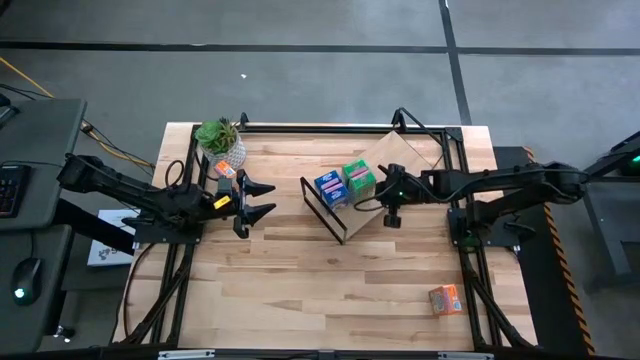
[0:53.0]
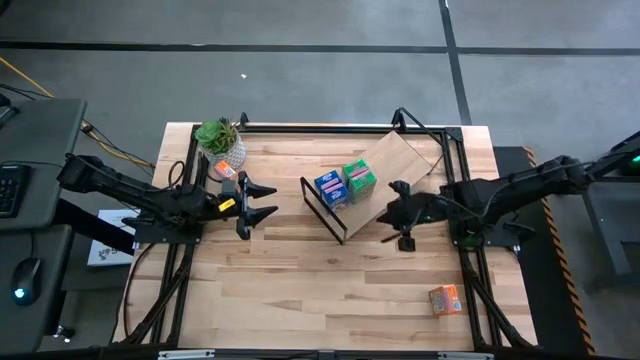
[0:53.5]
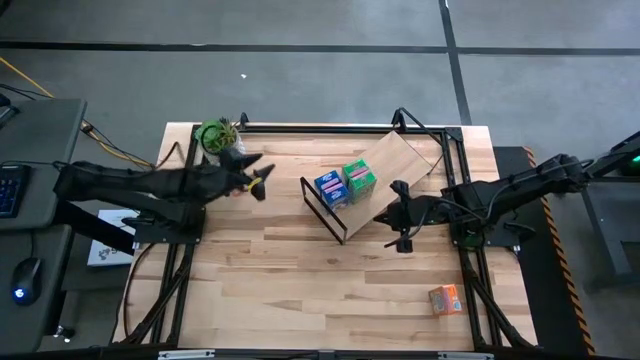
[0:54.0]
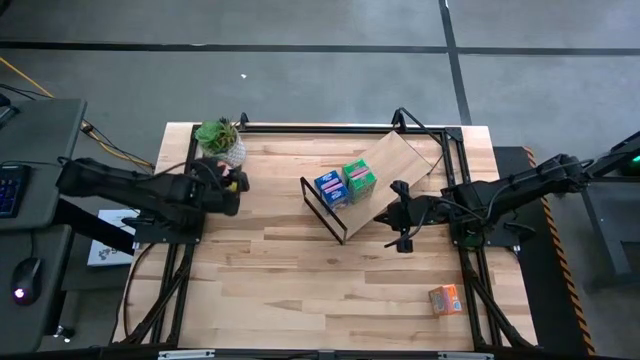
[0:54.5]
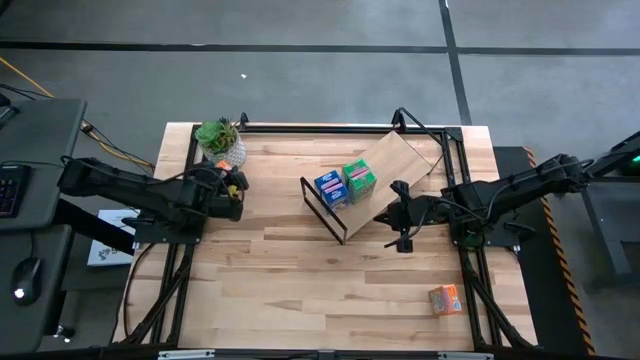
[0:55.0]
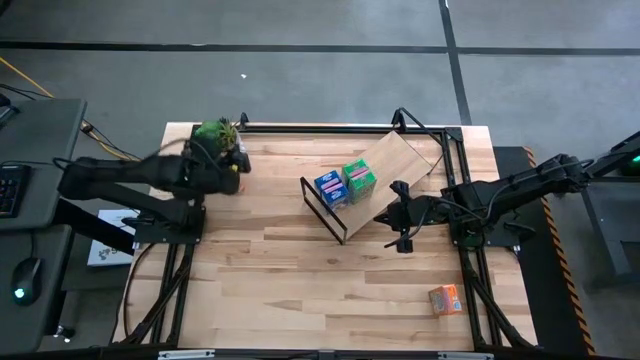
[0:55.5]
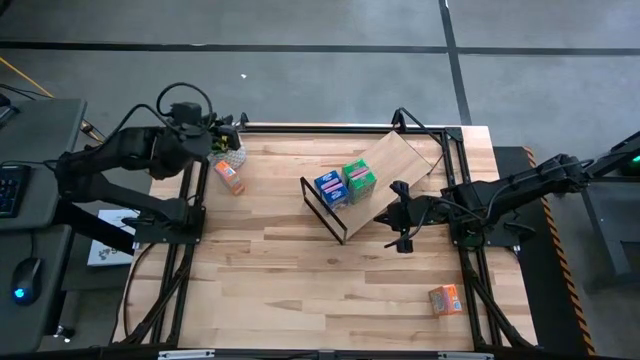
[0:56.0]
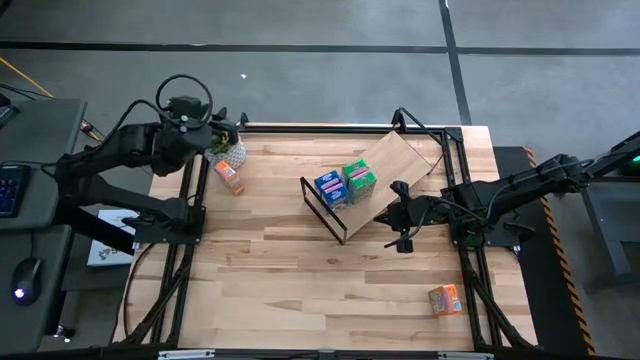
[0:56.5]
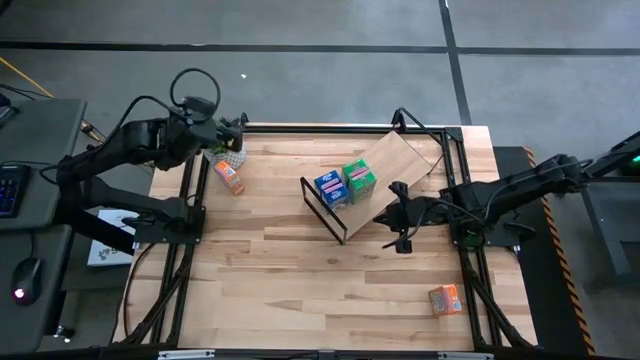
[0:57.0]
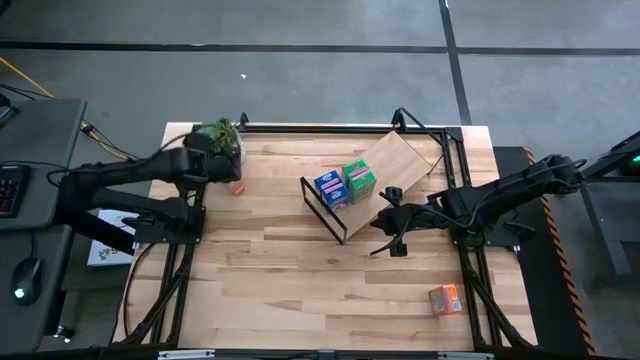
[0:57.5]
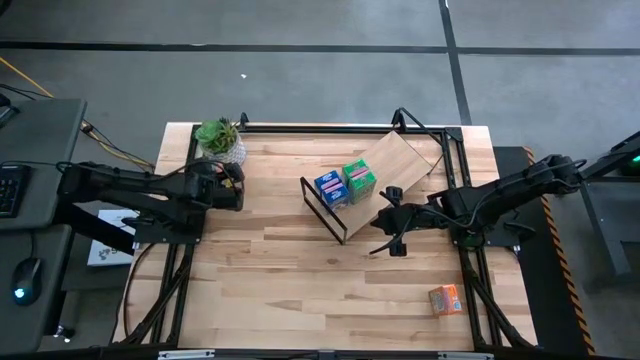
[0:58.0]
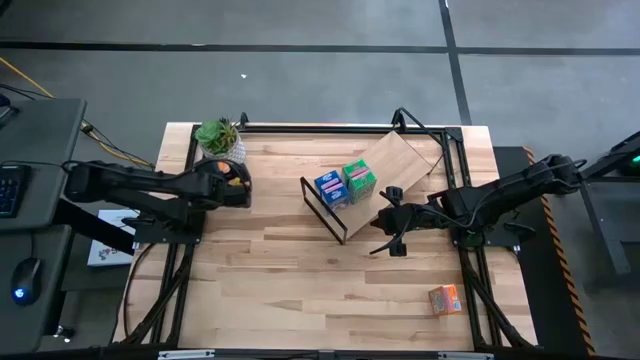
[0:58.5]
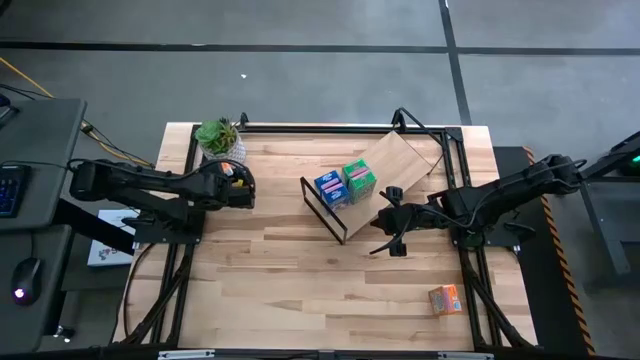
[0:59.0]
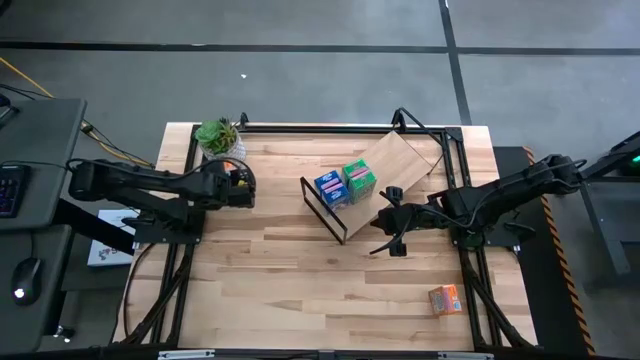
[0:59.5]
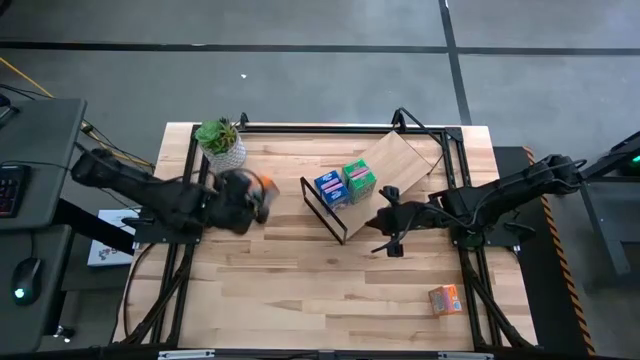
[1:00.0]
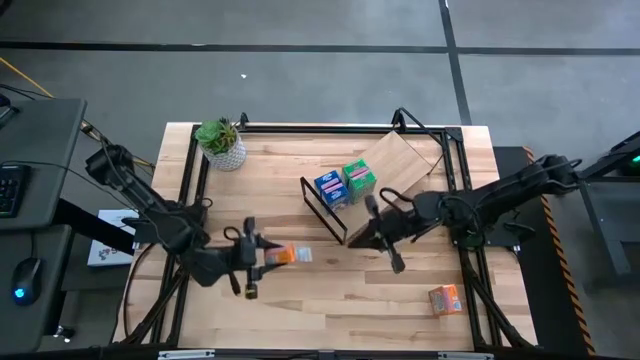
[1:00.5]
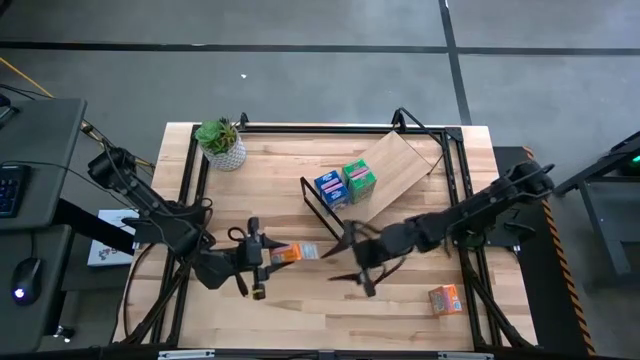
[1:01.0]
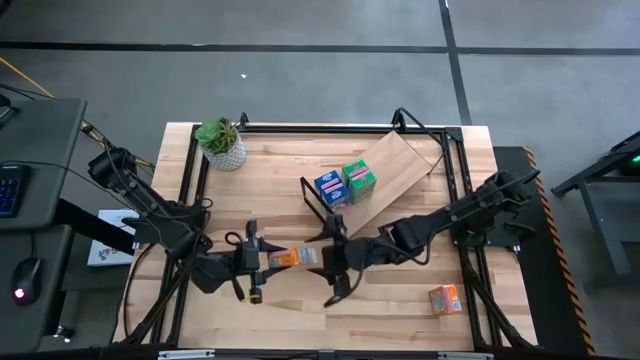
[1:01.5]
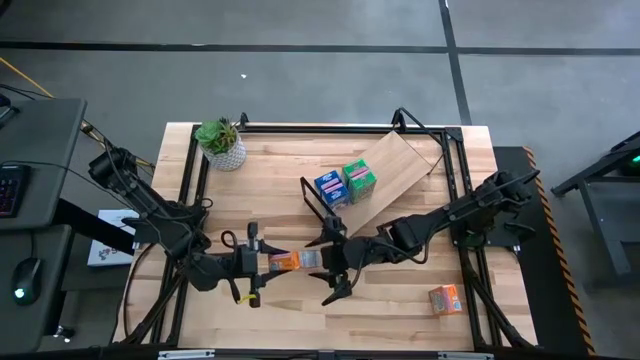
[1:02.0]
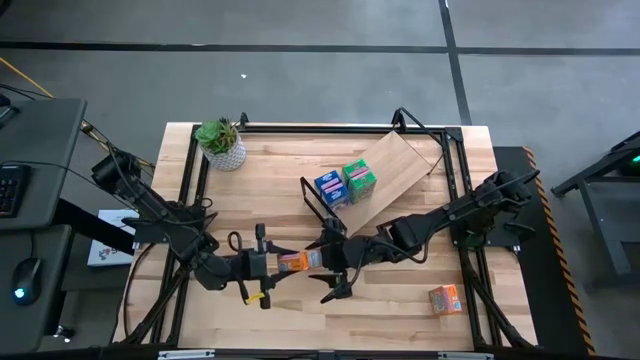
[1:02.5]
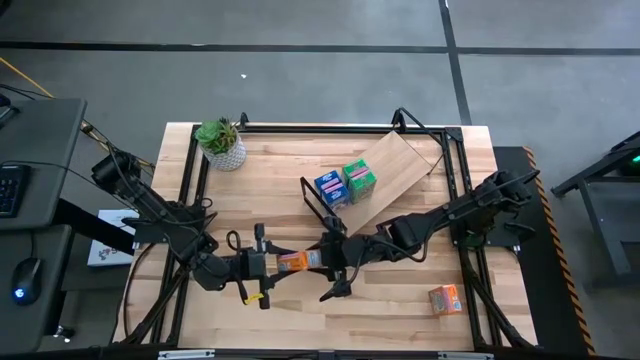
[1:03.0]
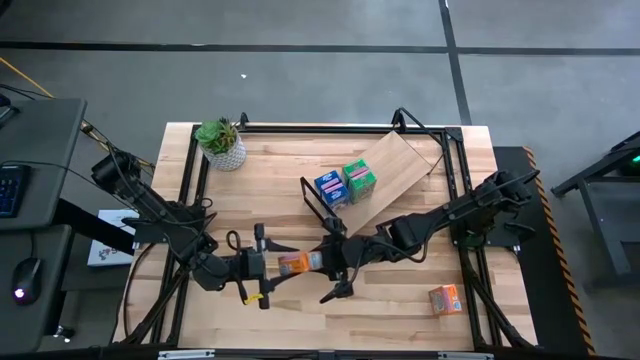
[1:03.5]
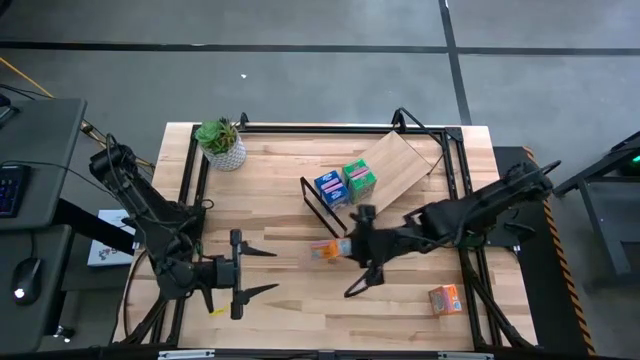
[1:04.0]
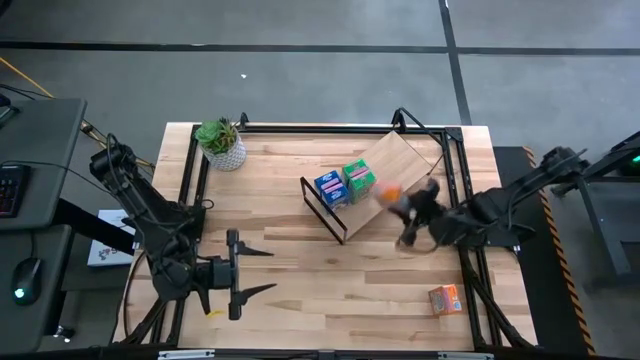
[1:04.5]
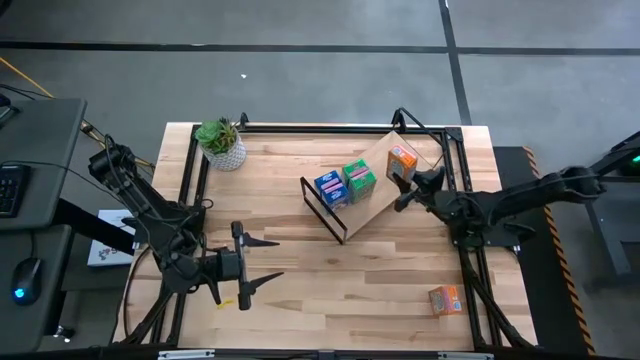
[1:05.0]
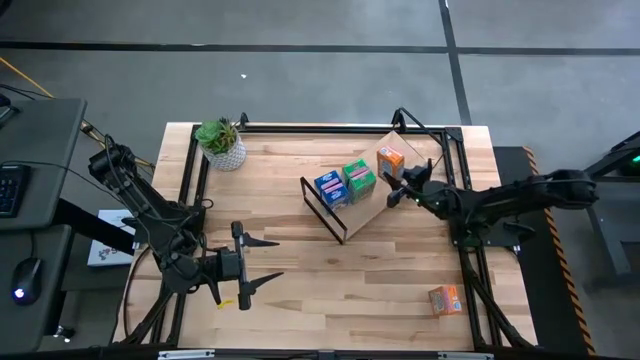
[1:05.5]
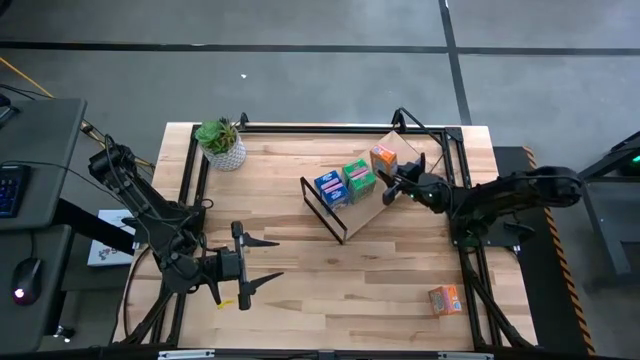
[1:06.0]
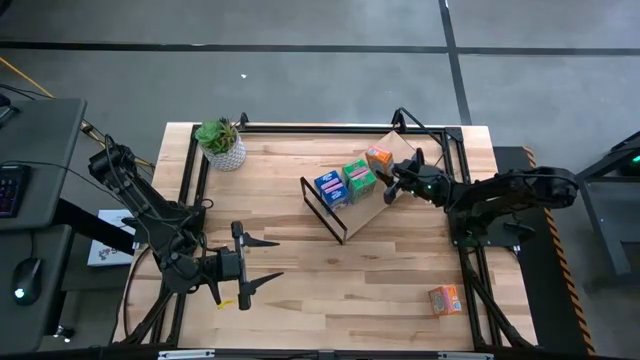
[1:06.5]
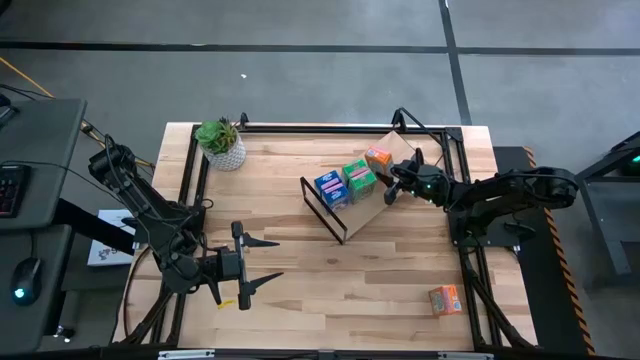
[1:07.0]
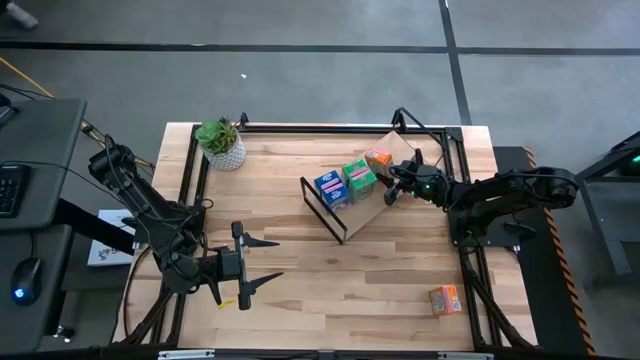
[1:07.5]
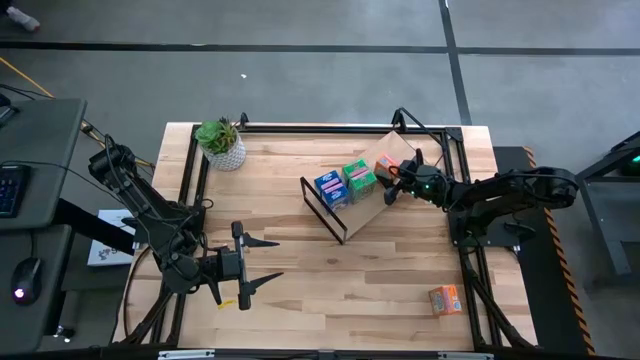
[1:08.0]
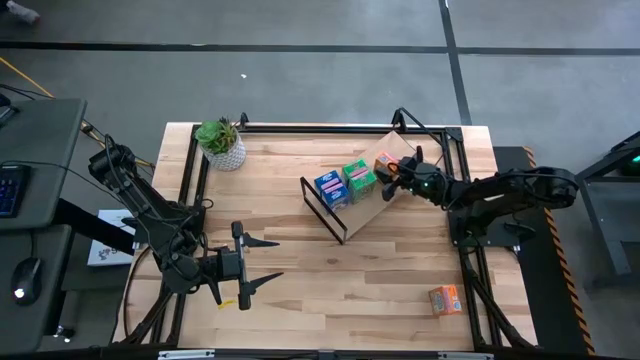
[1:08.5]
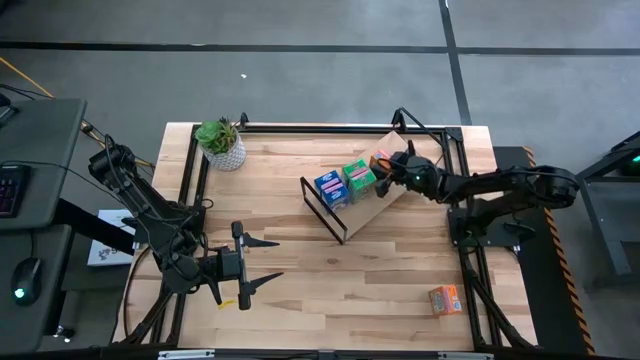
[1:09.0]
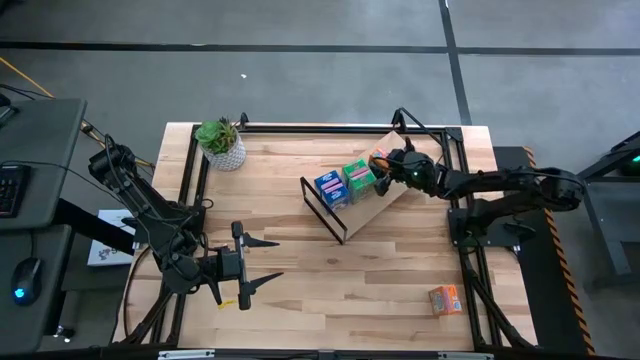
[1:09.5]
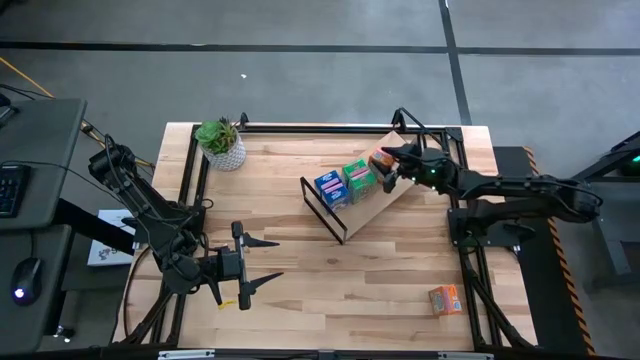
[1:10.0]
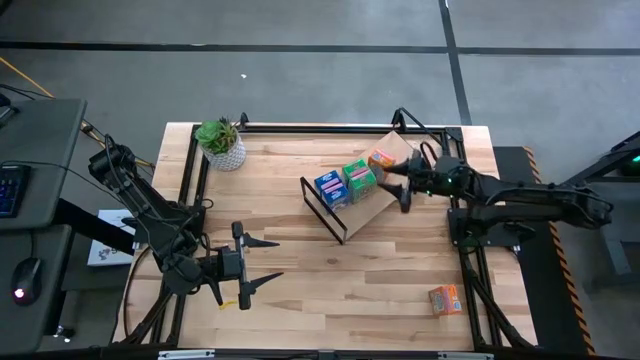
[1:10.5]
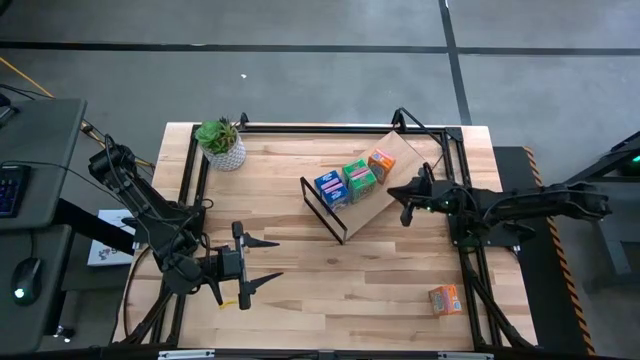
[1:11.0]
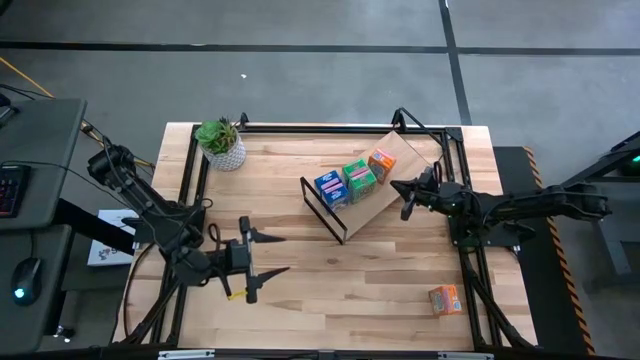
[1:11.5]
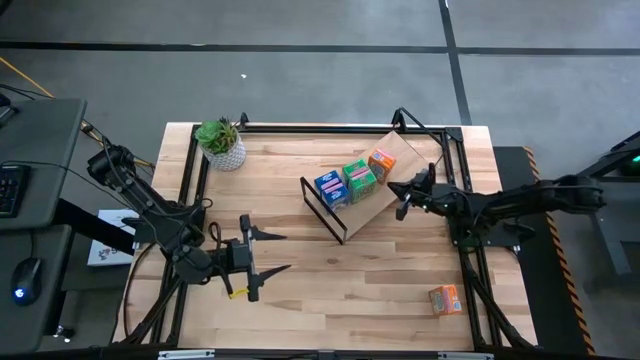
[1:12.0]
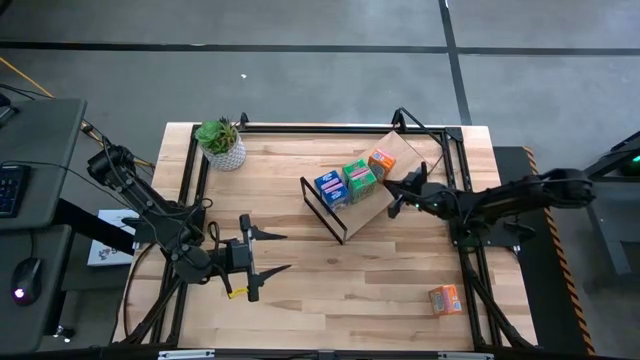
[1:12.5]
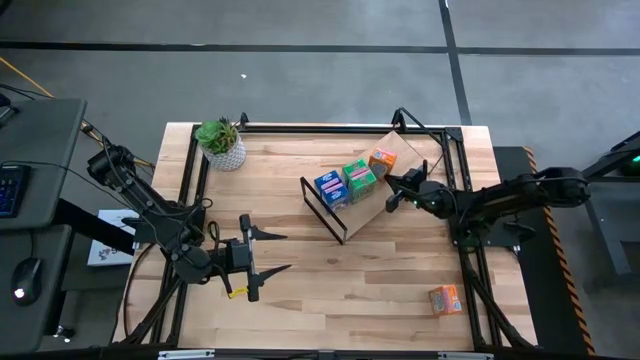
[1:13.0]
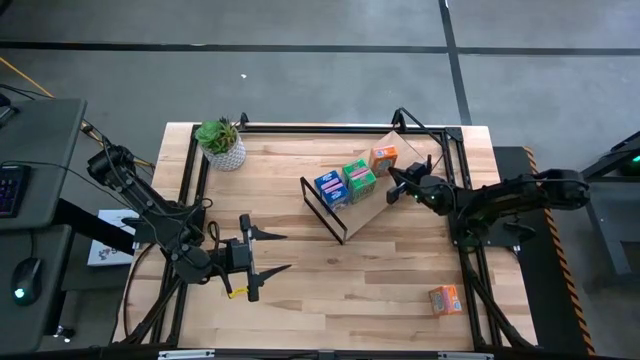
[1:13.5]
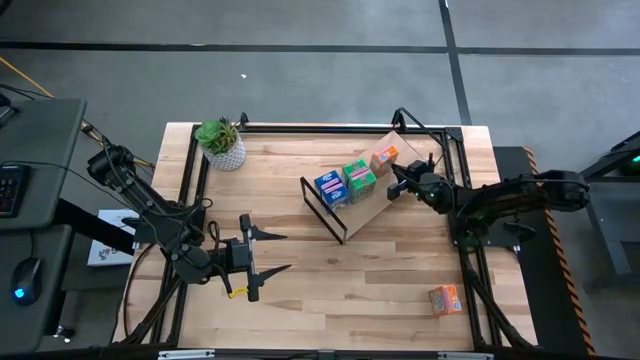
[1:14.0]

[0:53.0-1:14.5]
Task: Stack cereal on shelf
Put the top orange cereal box on the shelf
